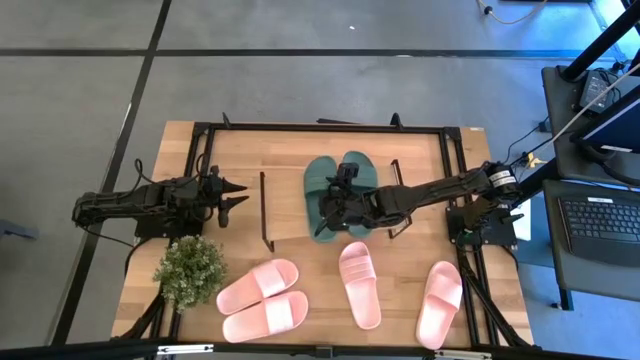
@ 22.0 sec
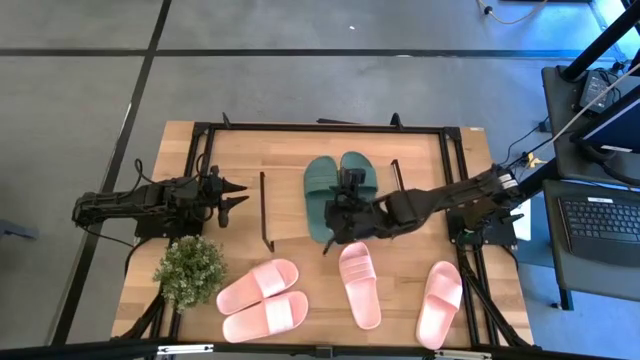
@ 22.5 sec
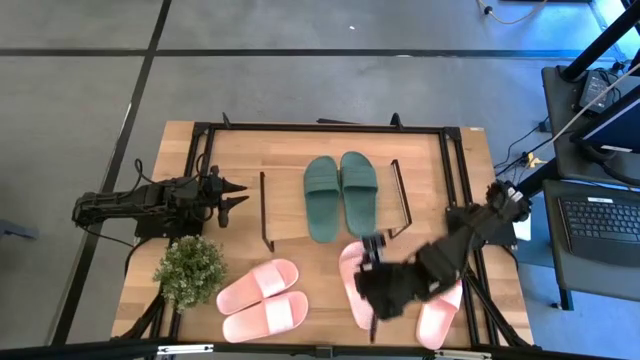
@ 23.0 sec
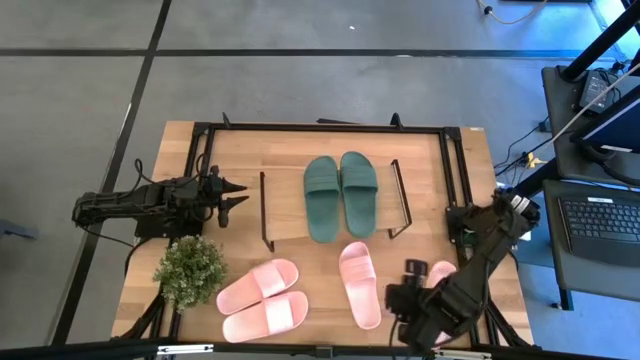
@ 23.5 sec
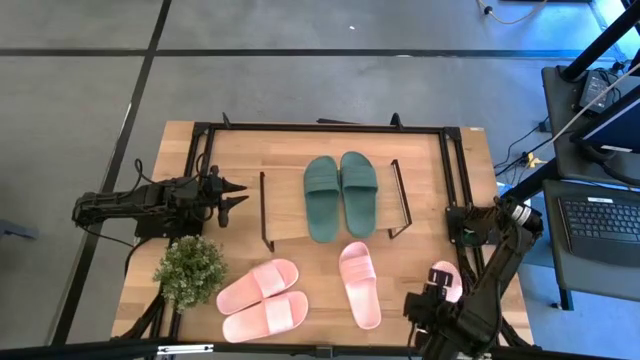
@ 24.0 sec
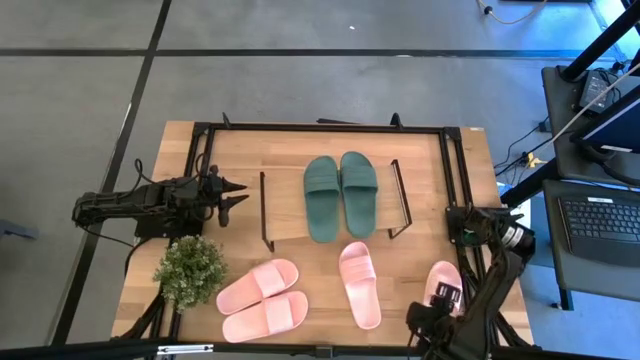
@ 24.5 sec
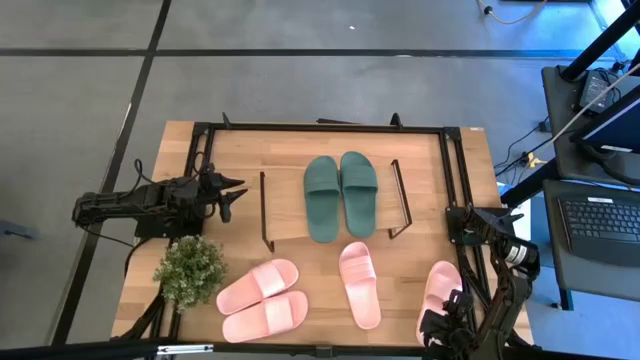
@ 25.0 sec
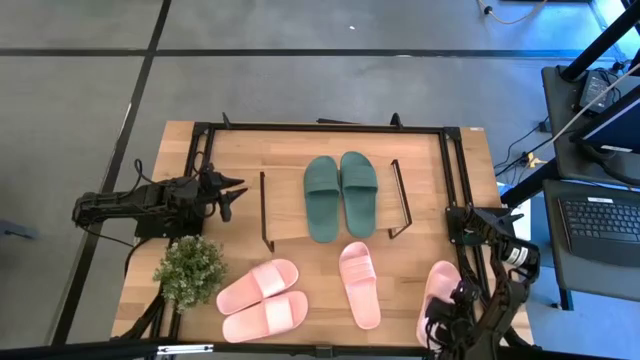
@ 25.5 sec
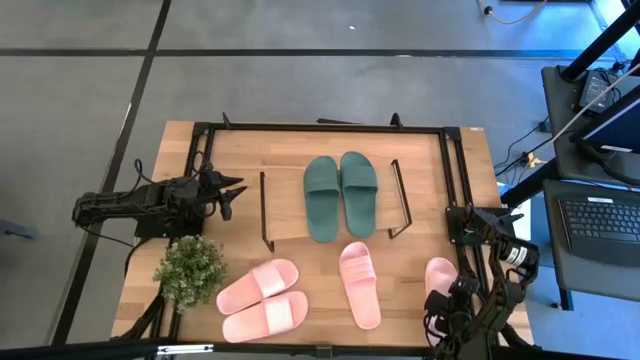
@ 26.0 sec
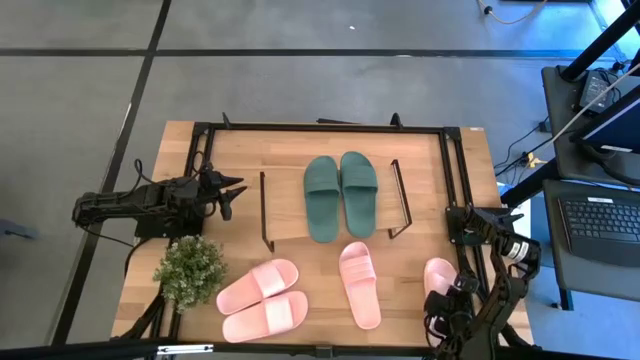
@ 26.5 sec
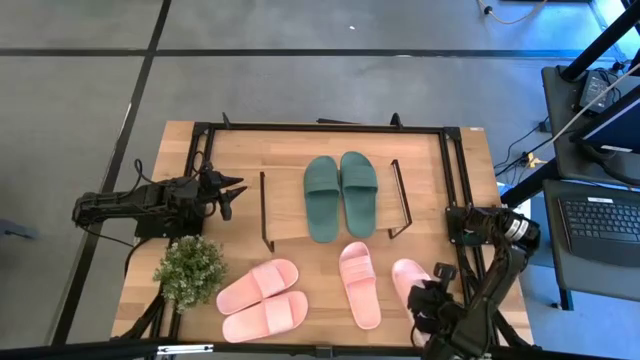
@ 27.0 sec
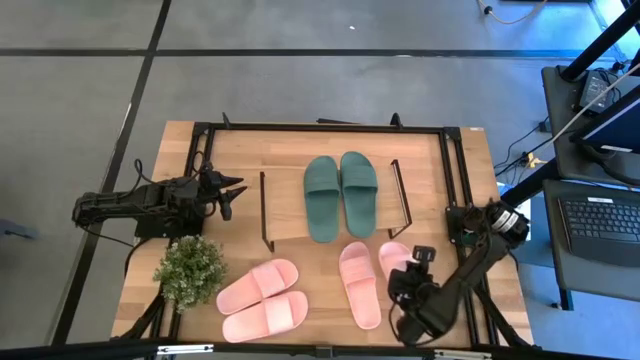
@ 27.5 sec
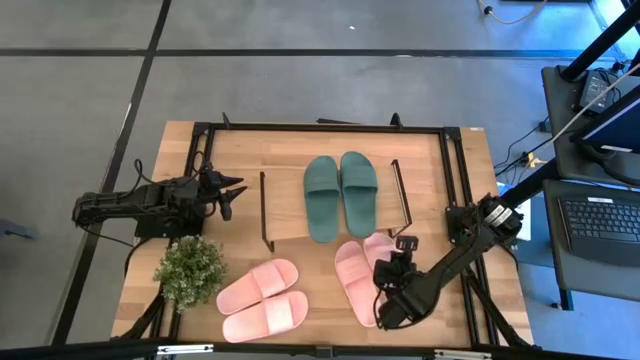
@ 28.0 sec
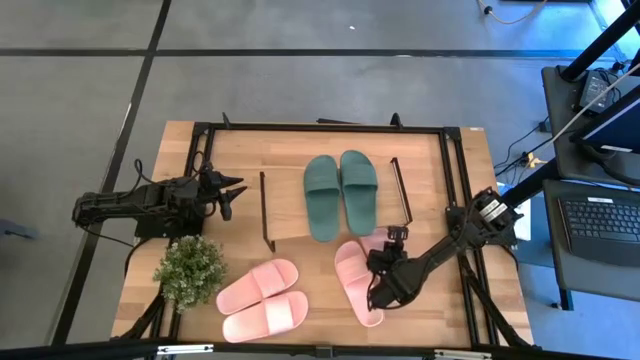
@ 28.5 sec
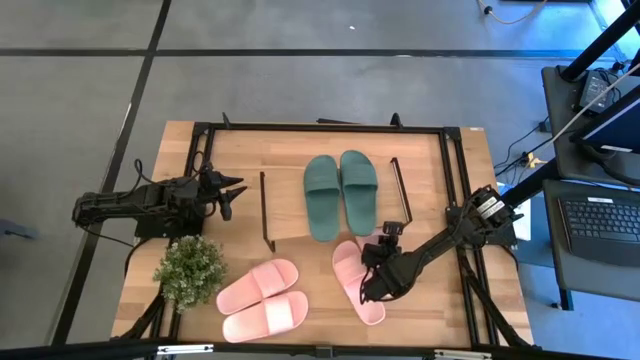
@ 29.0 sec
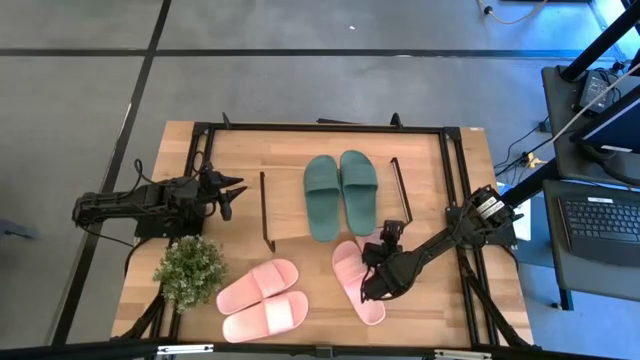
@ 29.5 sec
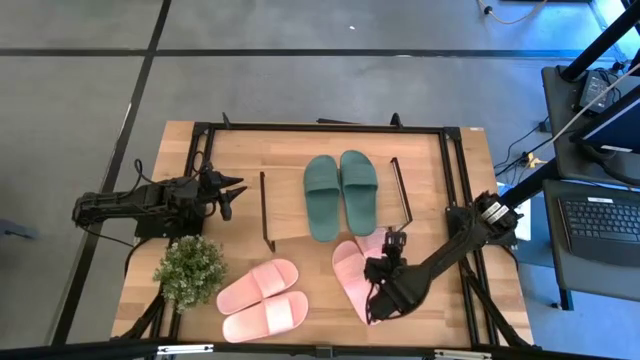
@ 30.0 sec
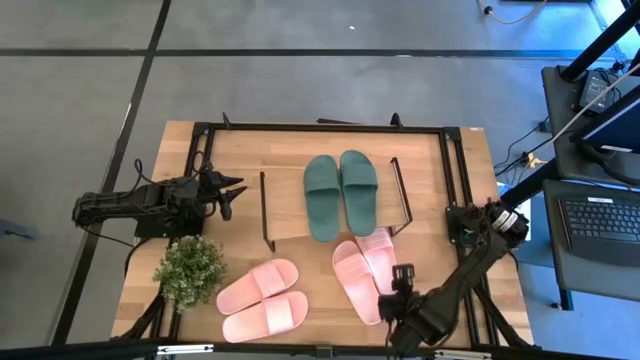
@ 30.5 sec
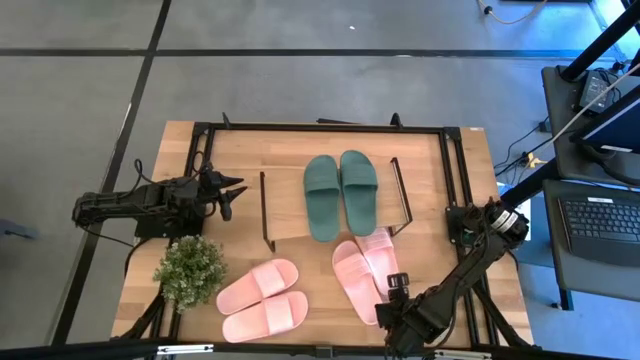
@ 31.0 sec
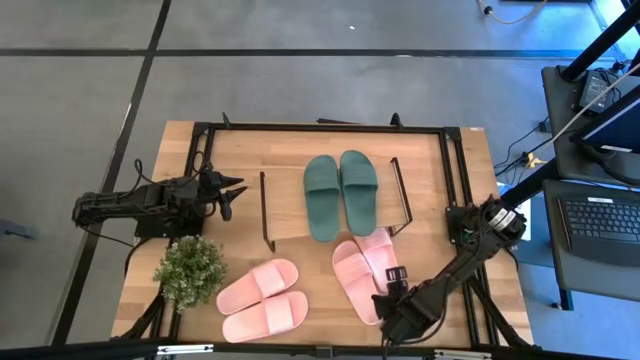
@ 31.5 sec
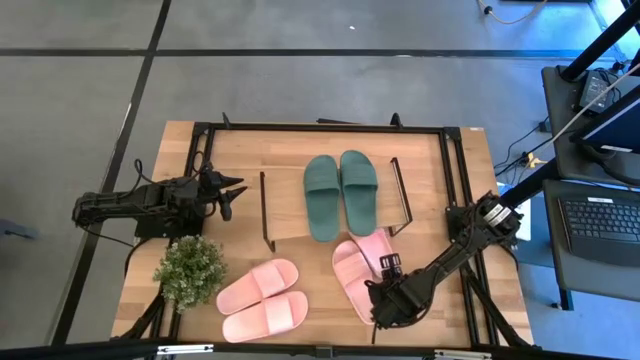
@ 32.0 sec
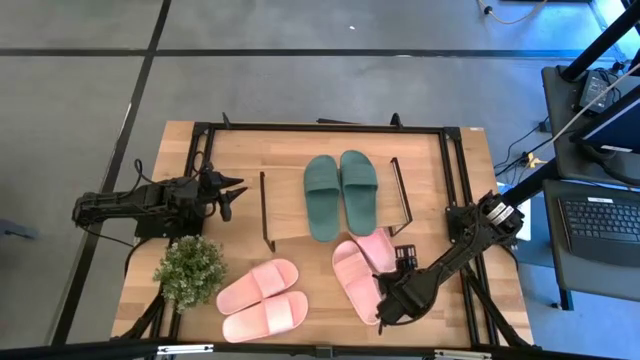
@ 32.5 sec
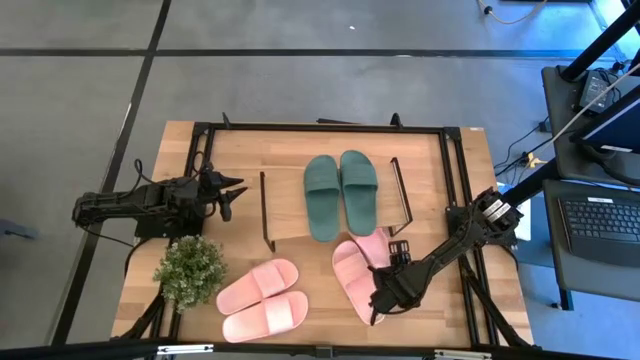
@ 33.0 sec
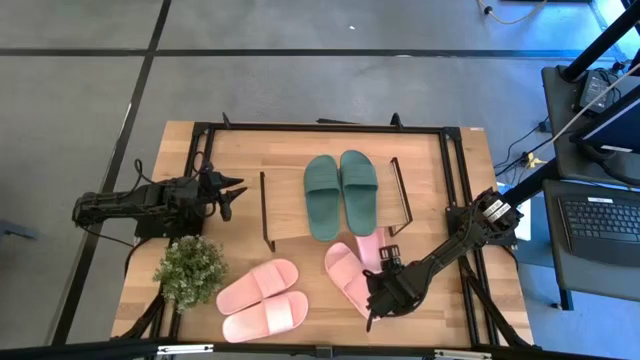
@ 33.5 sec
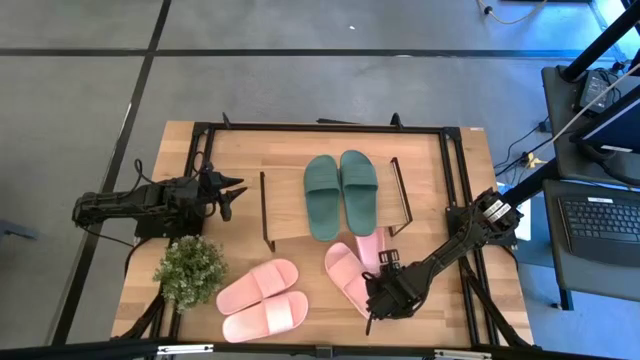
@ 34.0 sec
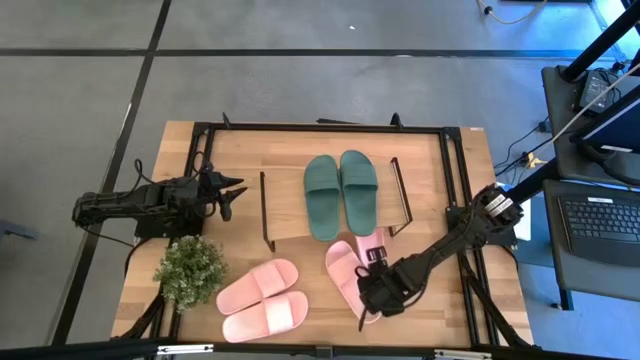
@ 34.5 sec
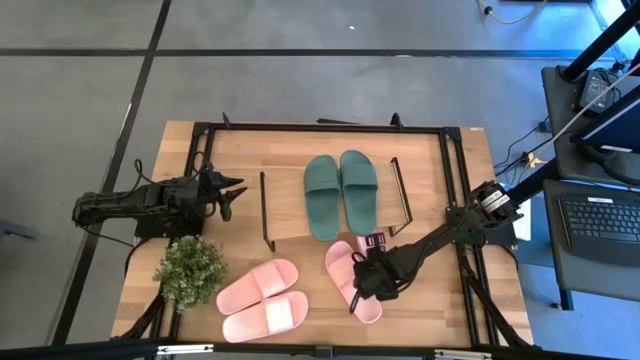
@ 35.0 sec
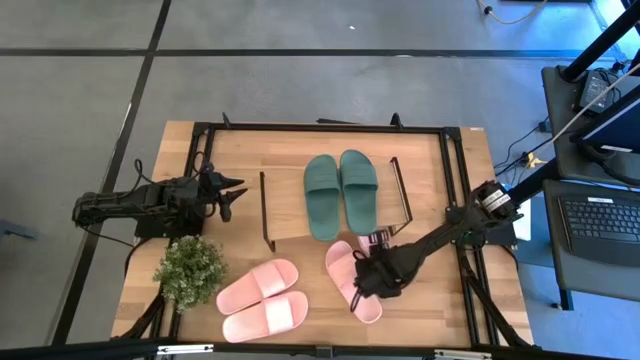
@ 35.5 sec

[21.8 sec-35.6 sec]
Task: Pick and place slides into the shelf
Put the pink slide under the shelf

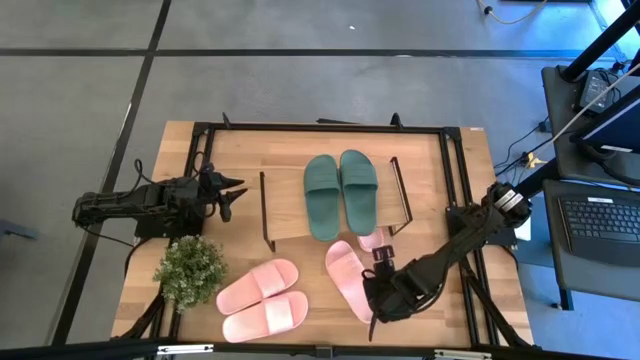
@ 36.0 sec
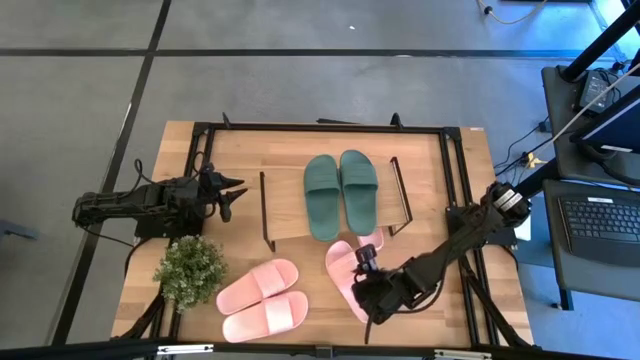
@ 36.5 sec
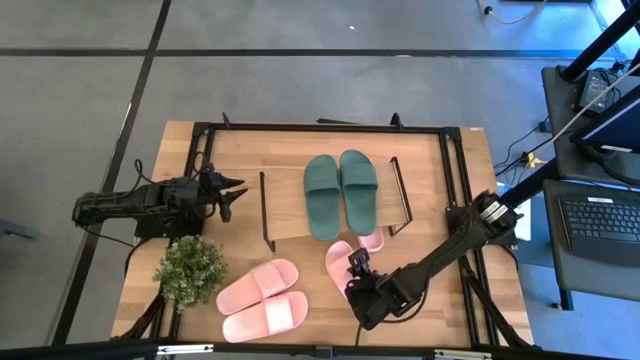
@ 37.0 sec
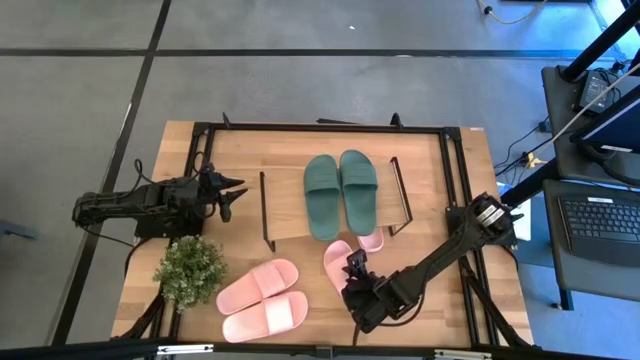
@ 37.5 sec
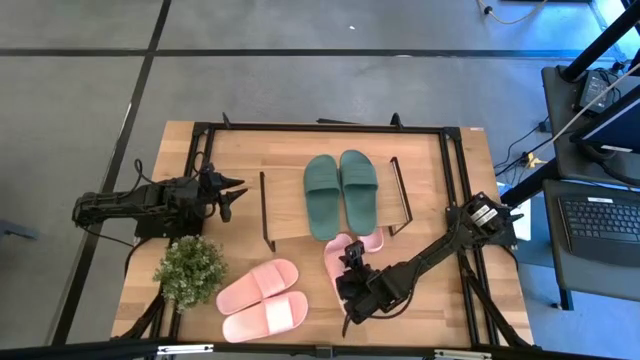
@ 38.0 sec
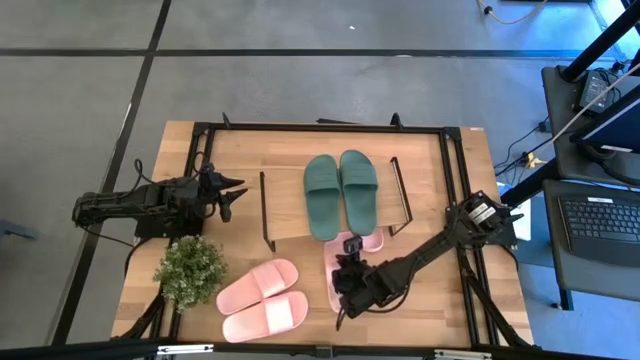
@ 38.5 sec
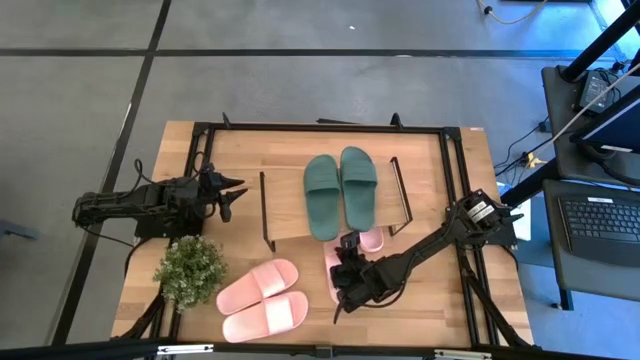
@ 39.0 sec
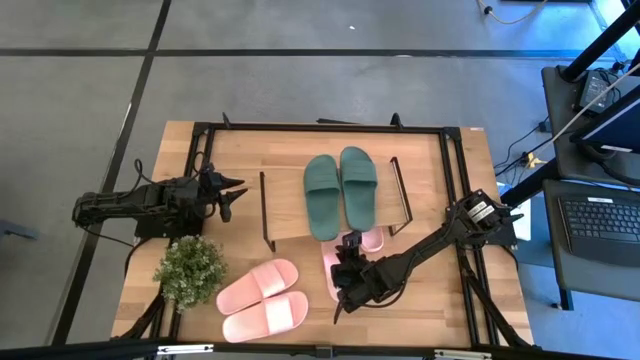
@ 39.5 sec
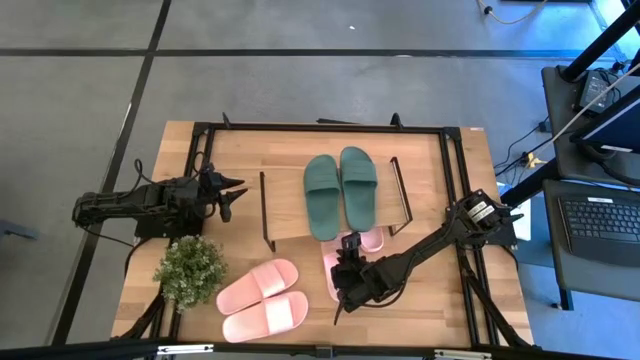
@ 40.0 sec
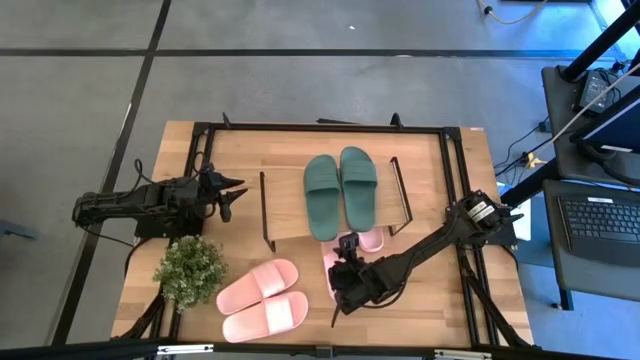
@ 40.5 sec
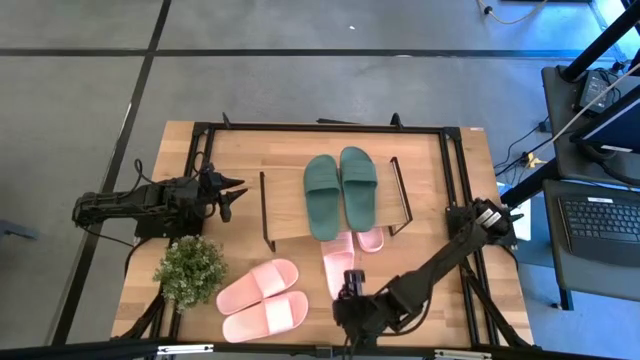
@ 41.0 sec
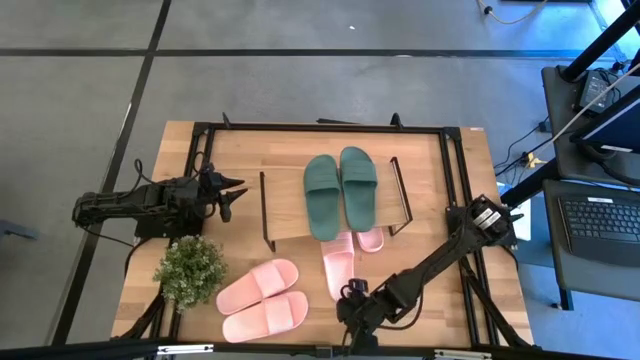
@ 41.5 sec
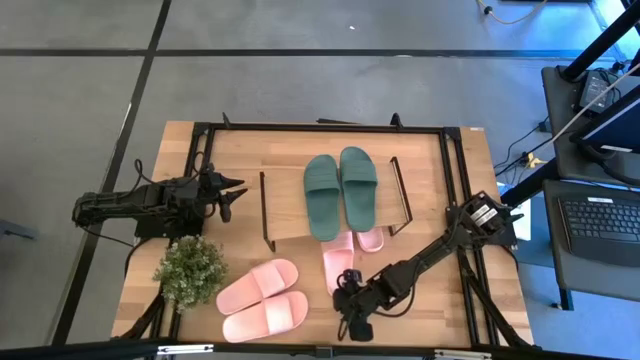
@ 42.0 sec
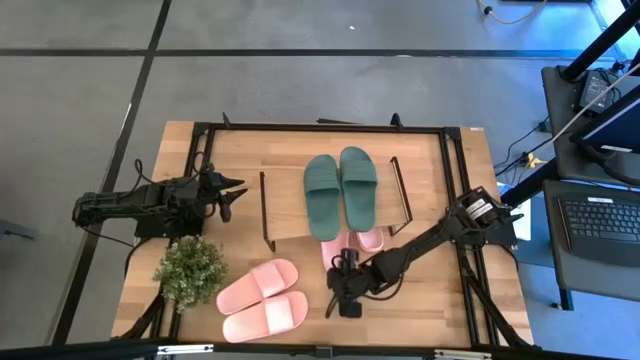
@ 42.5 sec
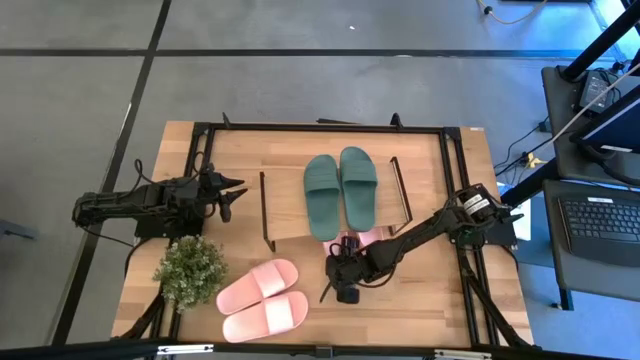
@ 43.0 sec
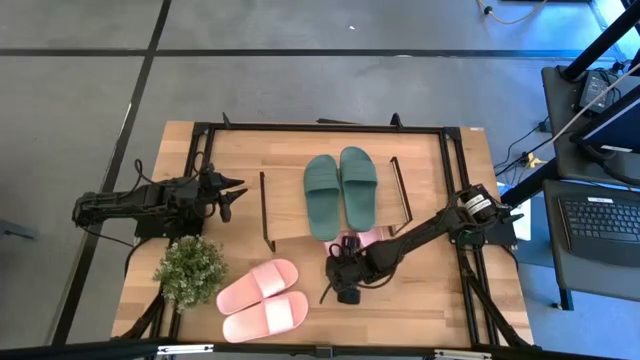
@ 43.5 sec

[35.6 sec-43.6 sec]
Put the pink slide under the shelf
